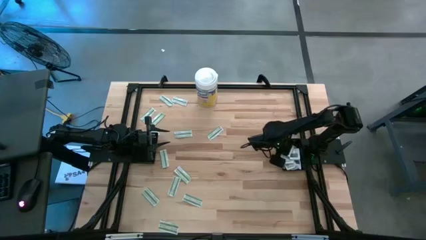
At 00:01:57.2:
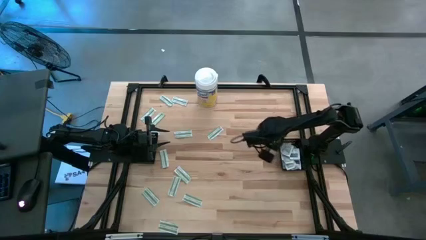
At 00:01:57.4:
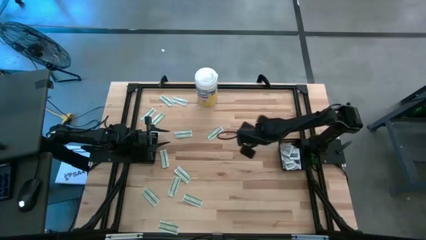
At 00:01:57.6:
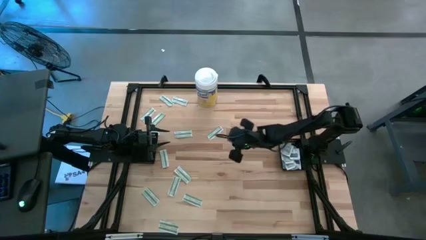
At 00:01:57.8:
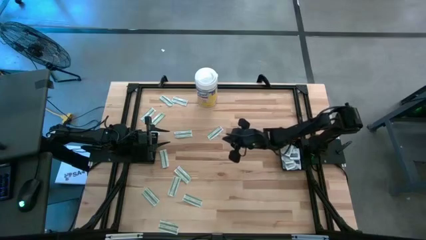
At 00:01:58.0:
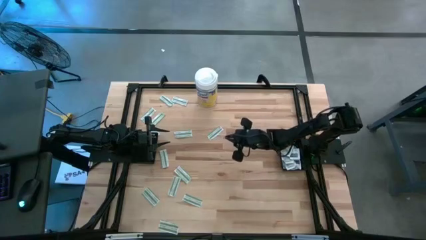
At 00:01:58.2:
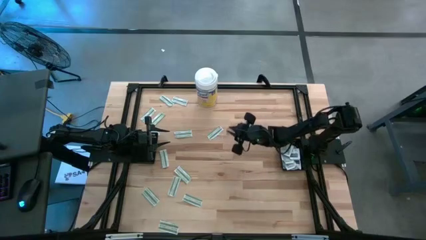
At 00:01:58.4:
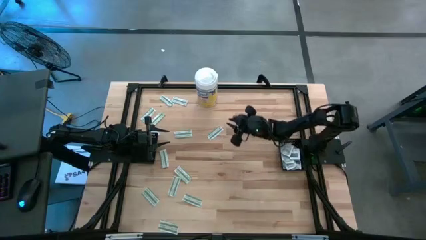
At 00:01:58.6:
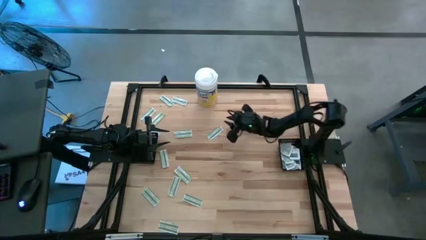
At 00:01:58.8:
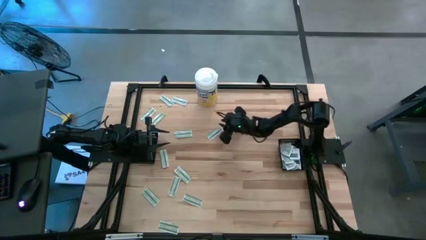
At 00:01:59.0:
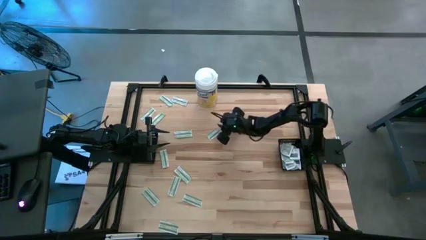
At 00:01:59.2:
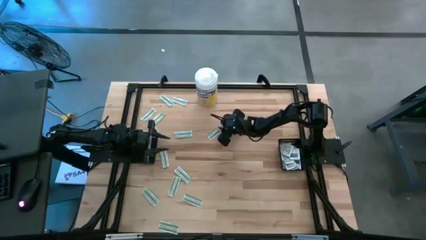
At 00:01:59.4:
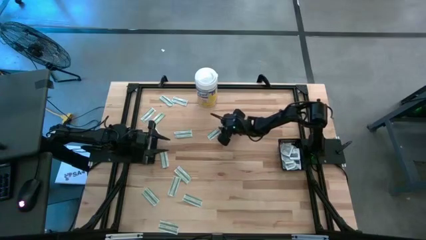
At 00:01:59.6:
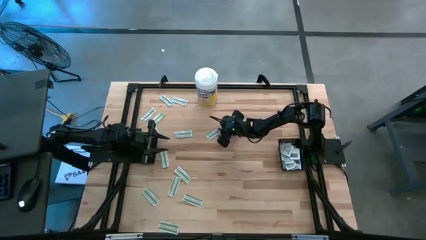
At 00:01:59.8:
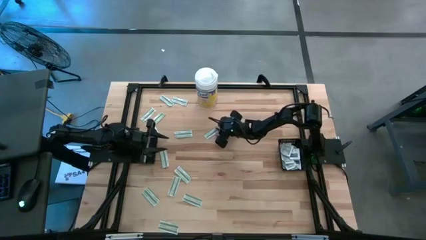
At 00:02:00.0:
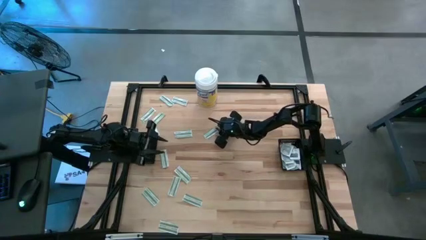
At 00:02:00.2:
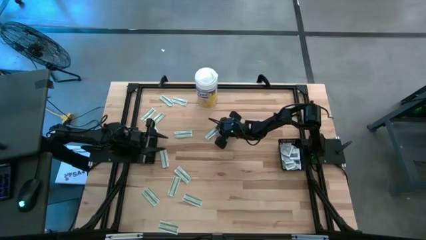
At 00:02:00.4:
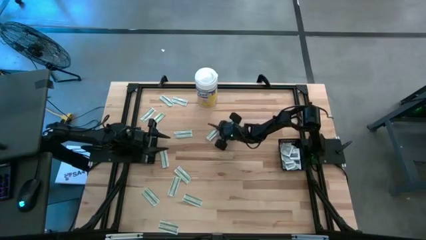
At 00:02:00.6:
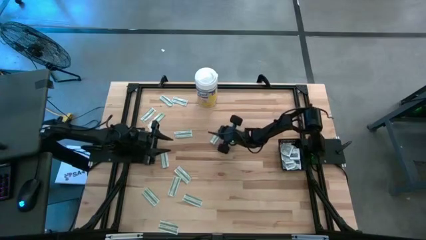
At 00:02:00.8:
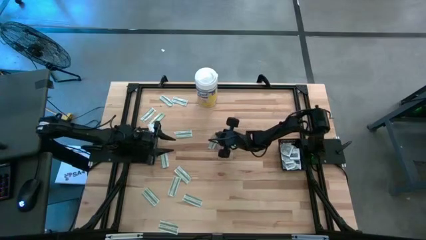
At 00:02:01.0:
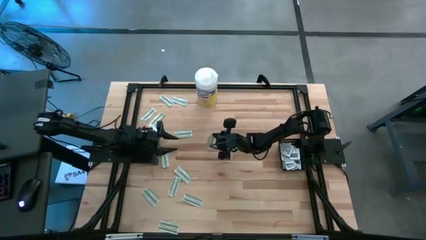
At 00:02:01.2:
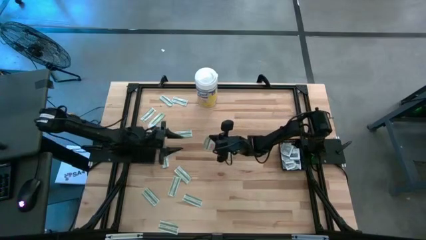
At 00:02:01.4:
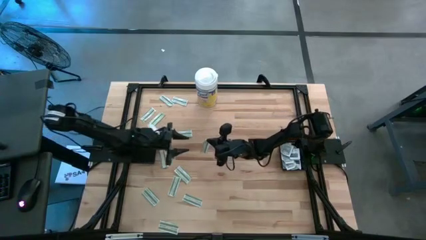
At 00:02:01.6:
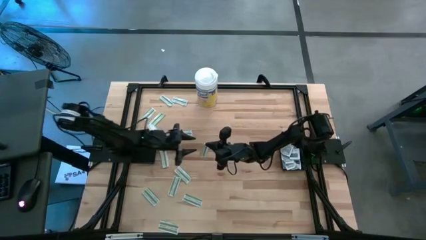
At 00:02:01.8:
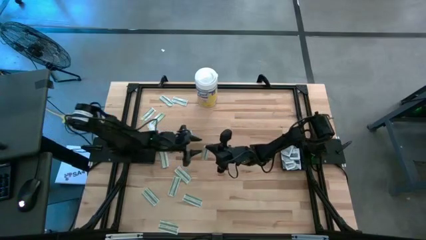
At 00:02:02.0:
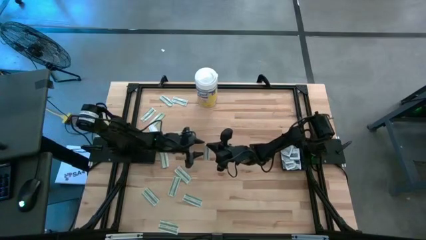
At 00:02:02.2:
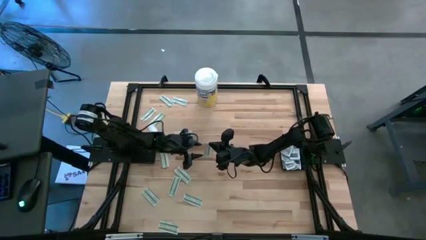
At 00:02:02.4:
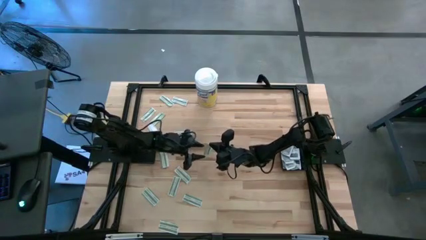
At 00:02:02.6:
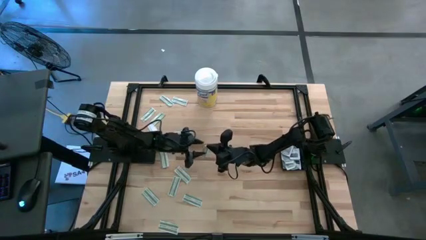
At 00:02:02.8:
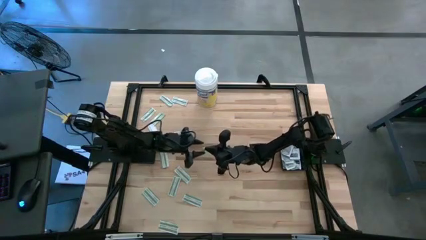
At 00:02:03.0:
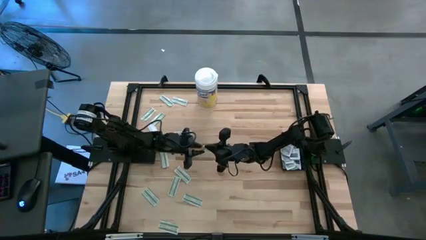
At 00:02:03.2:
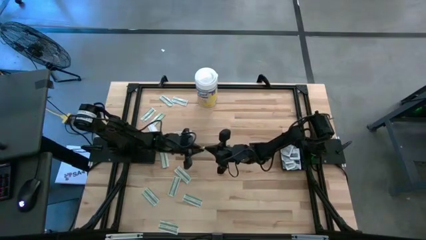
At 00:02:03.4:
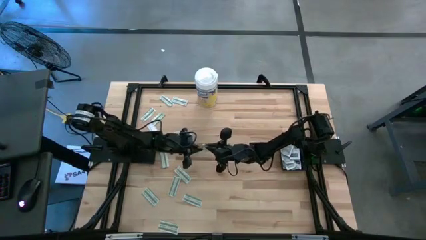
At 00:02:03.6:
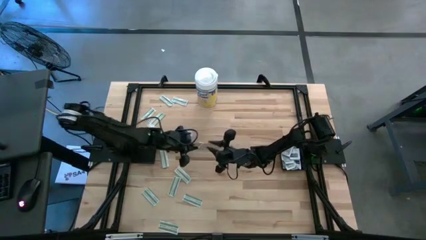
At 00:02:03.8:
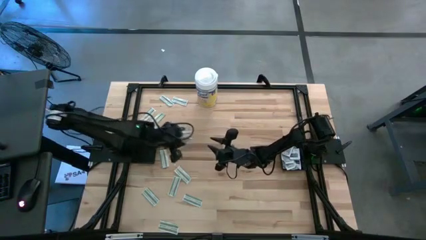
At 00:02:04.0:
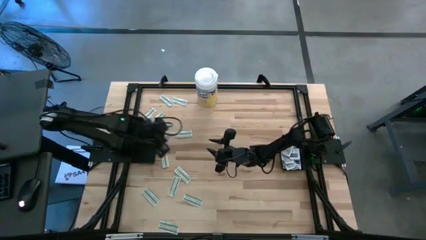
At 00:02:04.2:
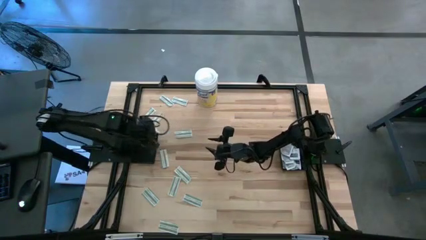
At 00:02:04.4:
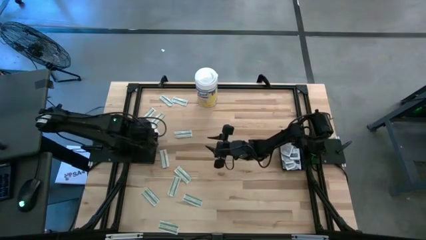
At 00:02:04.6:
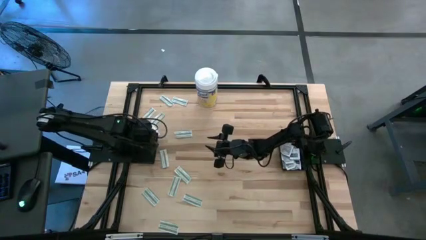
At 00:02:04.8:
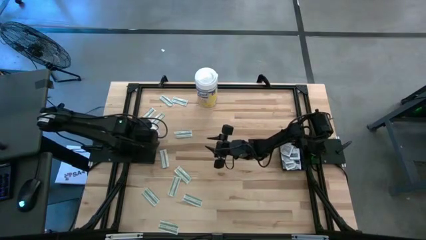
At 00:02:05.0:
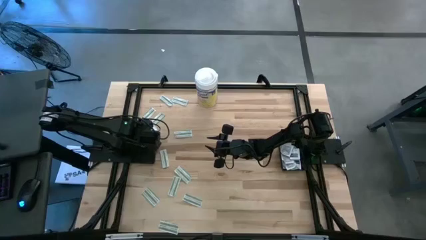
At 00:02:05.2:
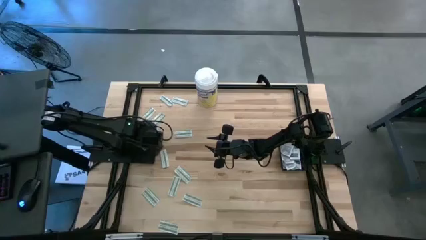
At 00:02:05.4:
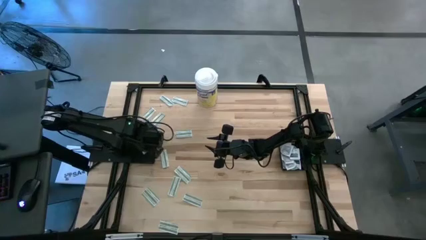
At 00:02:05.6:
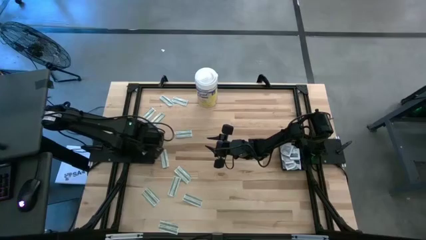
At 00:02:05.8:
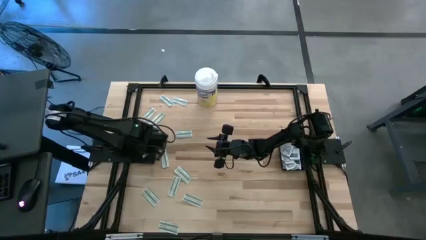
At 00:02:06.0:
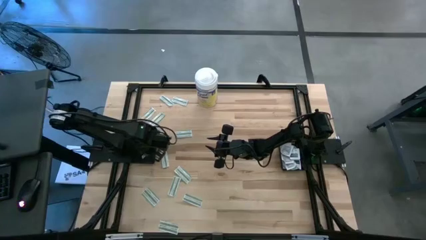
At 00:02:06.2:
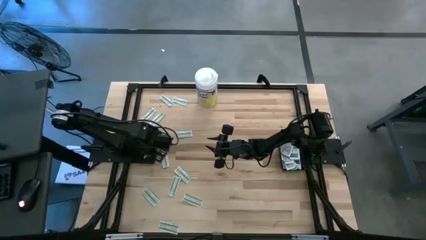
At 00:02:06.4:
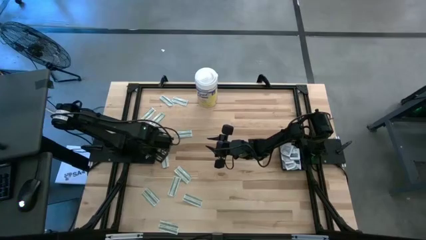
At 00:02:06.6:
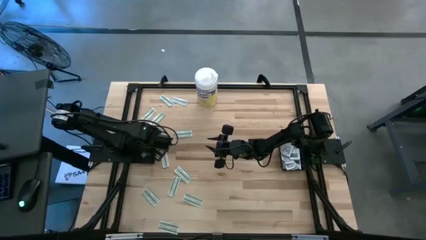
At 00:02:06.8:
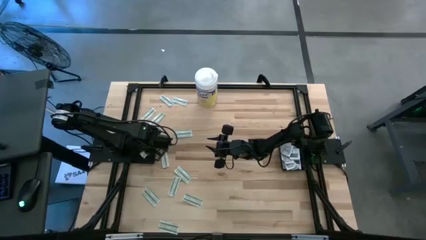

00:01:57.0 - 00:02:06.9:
Task: Pick & Place First Aid Supplies
Put the bandage into the left black basket

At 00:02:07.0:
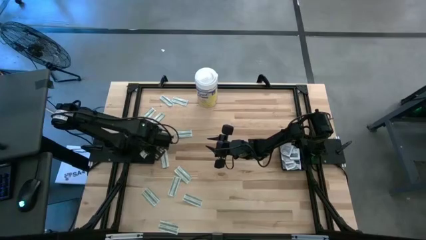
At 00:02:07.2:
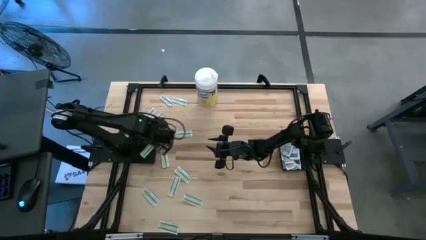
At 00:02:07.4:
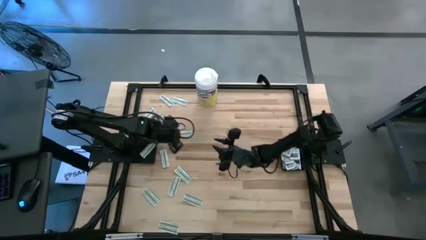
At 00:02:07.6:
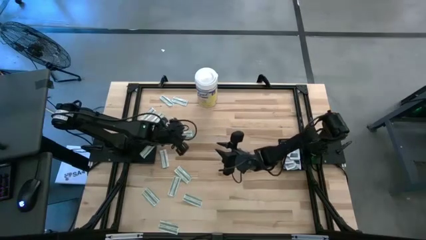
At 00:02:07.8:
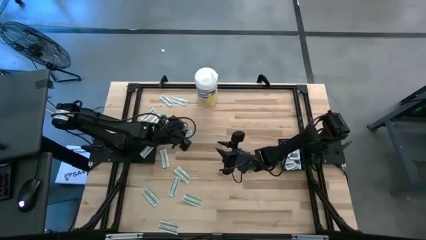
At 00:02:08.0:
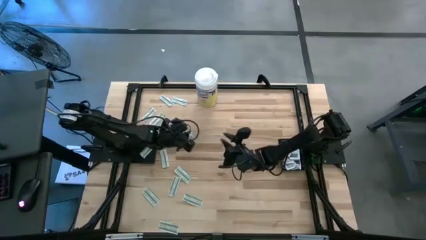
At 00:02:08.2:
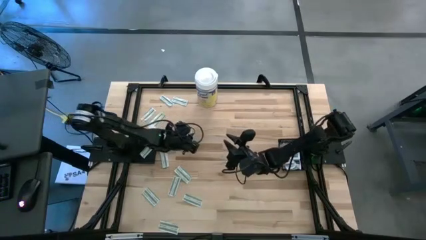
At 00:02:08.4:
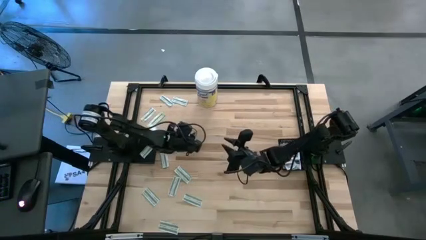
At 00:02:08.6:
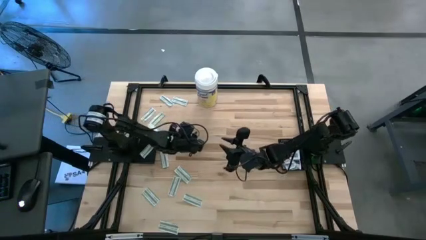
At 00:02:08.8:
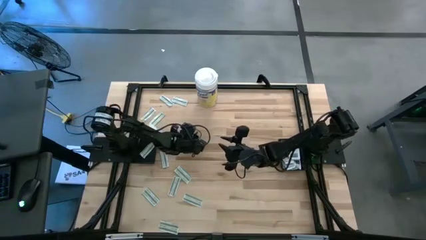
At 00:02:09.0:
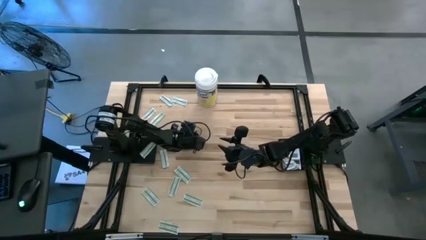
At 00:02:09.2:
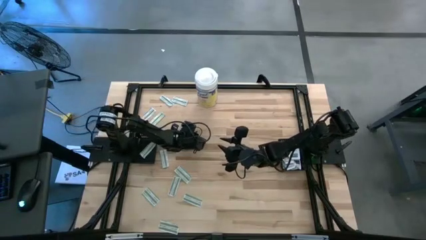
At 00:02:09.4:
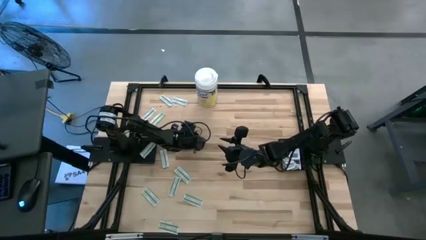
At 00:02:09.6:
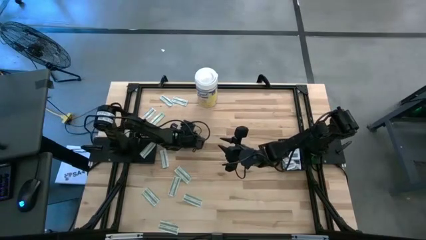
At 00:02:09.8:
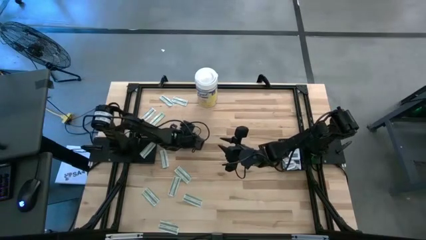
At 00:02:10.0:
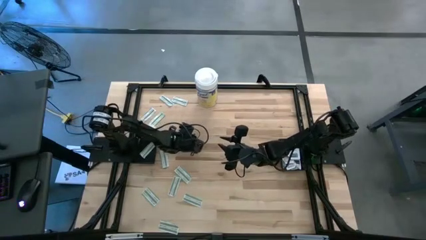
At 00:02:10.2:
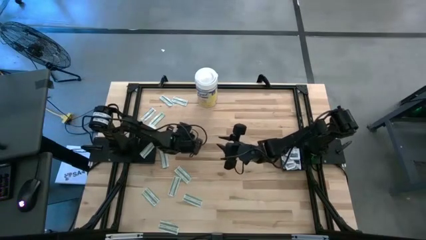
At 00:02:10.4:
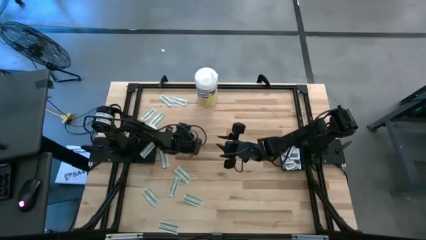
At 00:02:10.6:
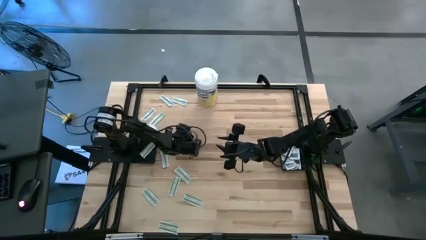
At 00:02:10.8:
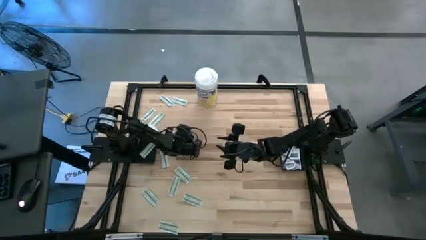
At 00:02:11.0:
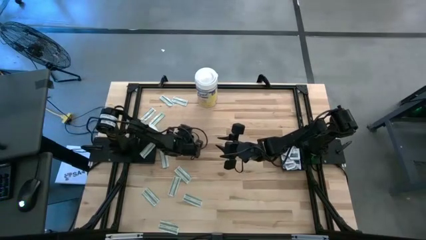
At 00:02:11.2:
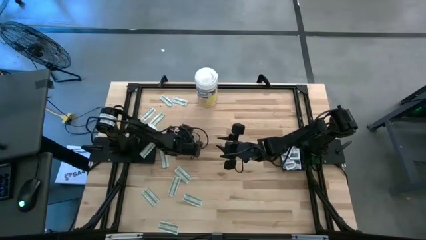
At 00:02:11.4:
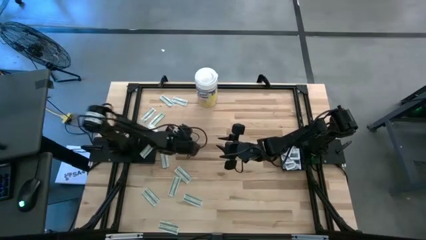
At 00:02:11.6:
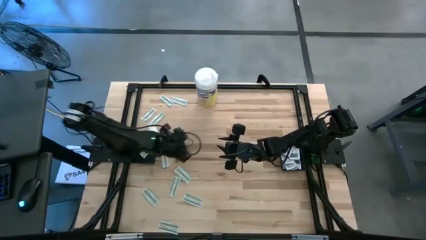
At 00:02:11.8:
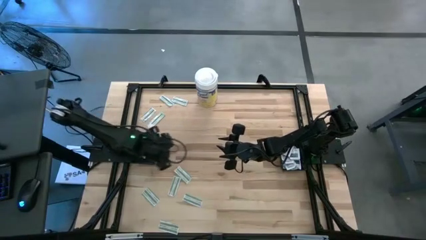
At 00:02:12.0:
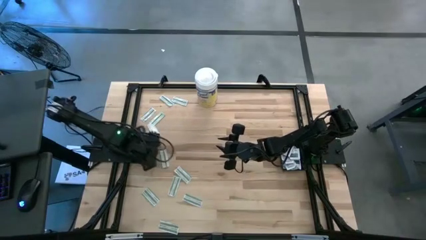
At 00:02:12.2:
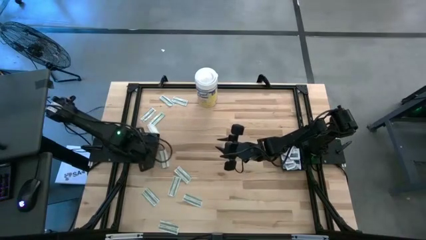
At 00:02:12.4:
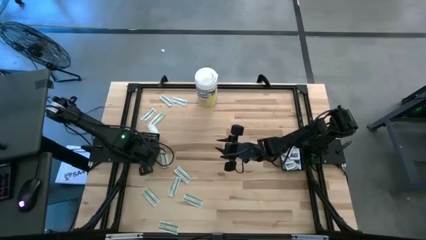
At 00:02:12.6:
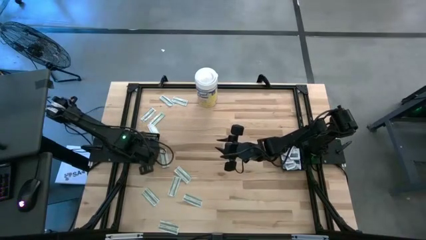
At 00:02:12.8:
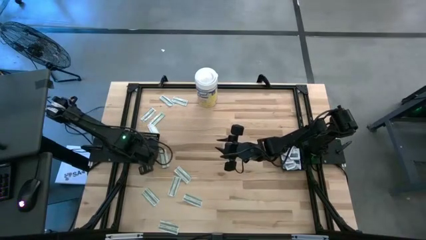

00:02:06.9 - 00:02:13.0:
Put the bandage into the left black basket
